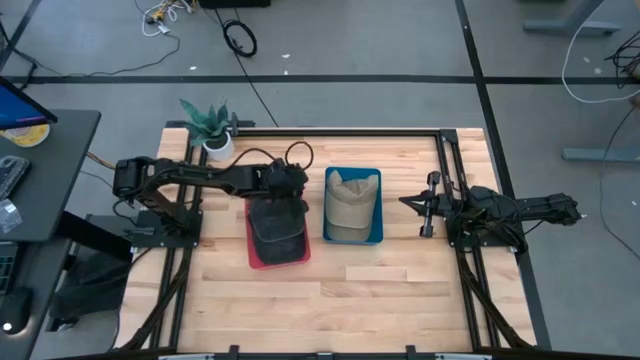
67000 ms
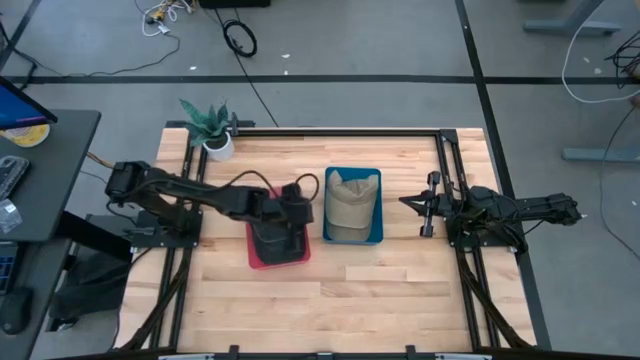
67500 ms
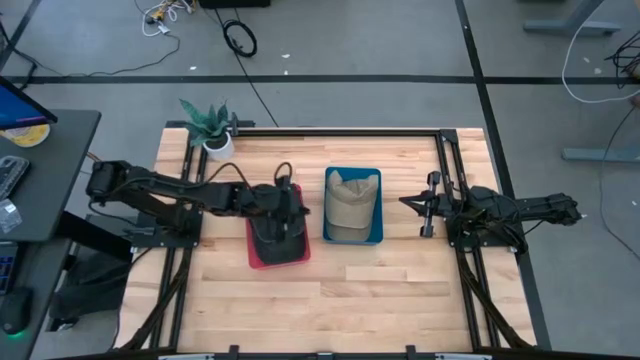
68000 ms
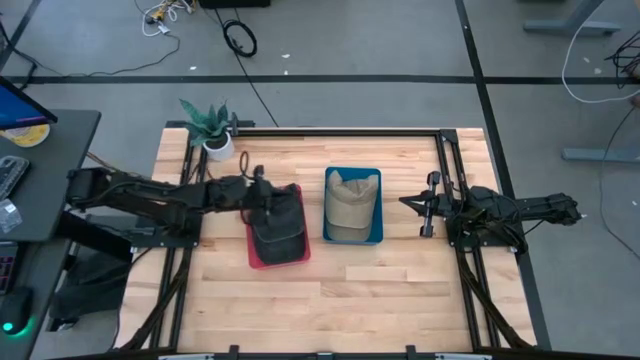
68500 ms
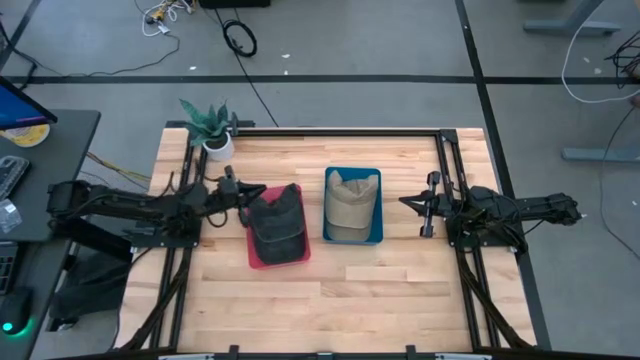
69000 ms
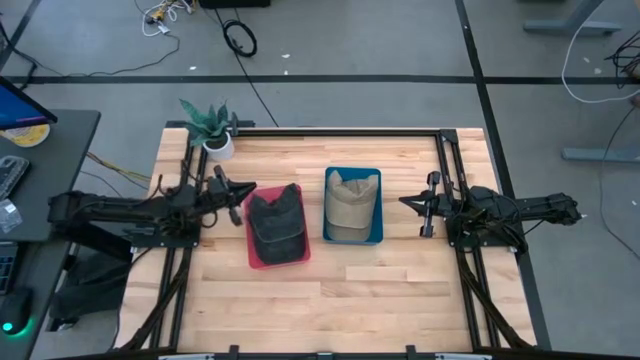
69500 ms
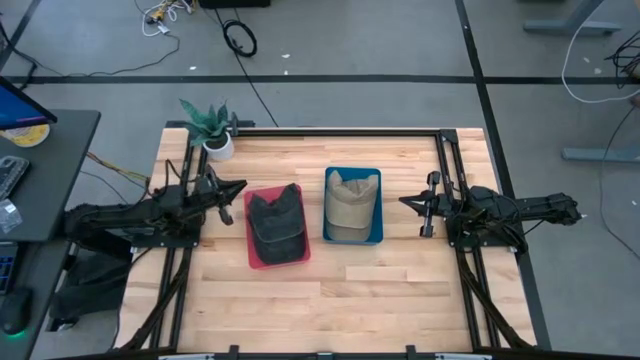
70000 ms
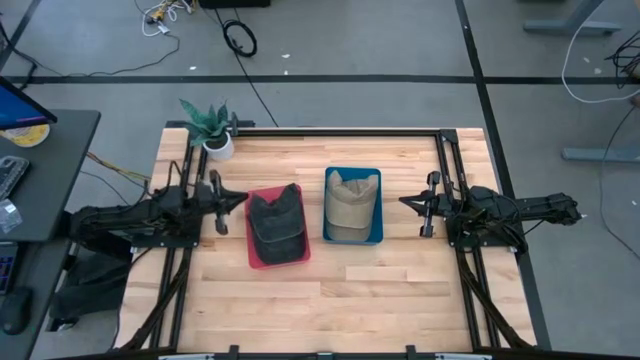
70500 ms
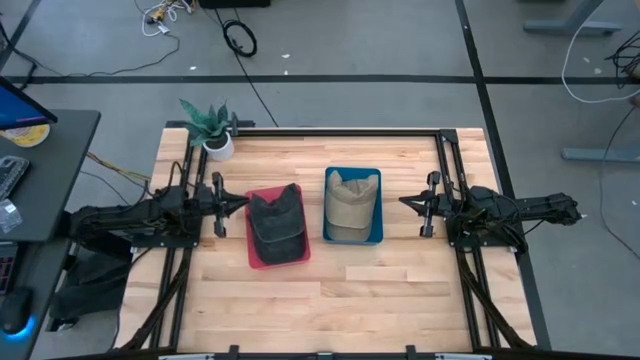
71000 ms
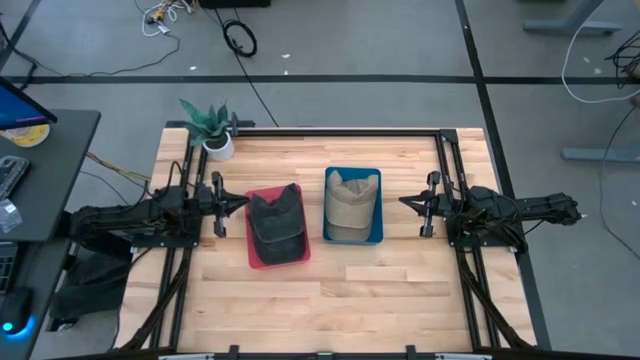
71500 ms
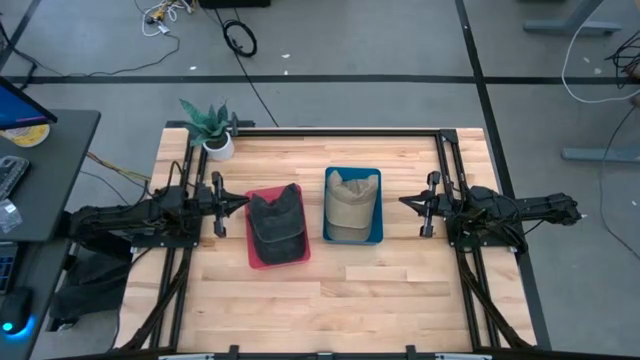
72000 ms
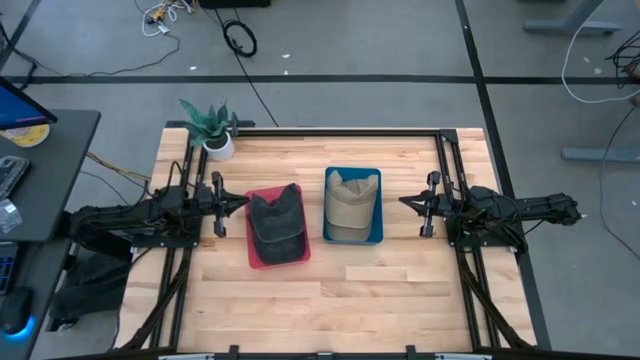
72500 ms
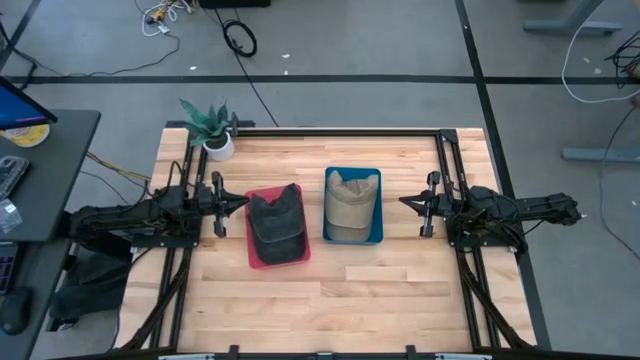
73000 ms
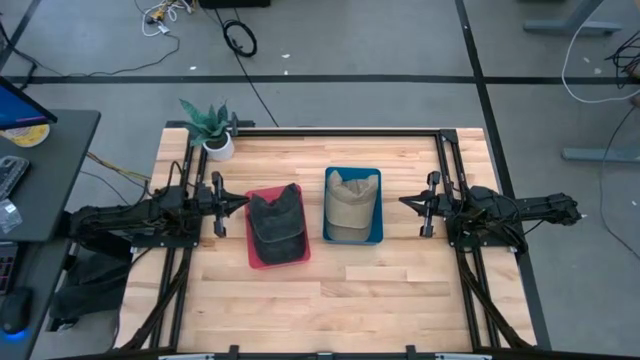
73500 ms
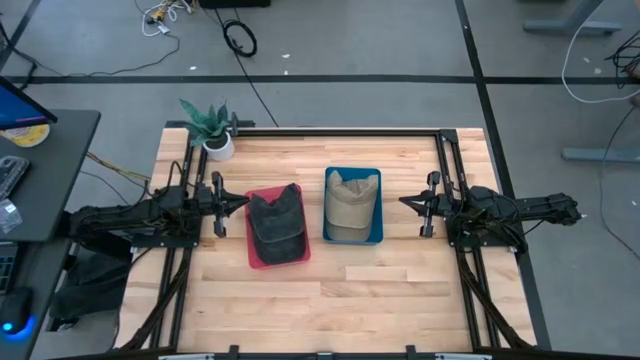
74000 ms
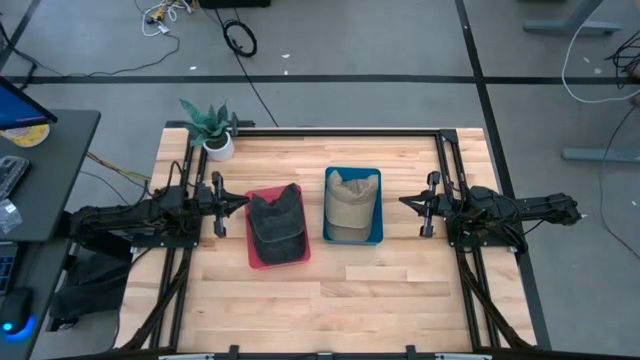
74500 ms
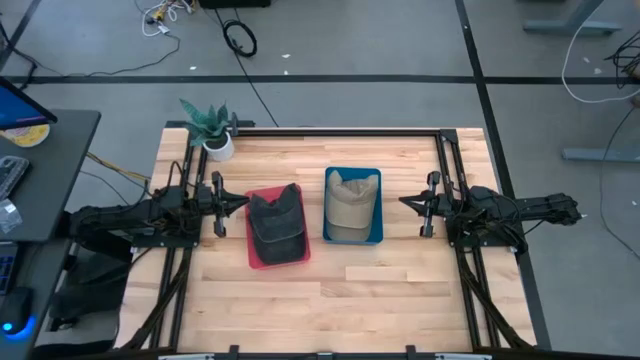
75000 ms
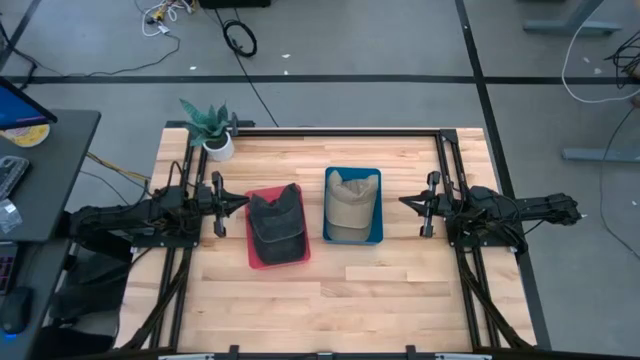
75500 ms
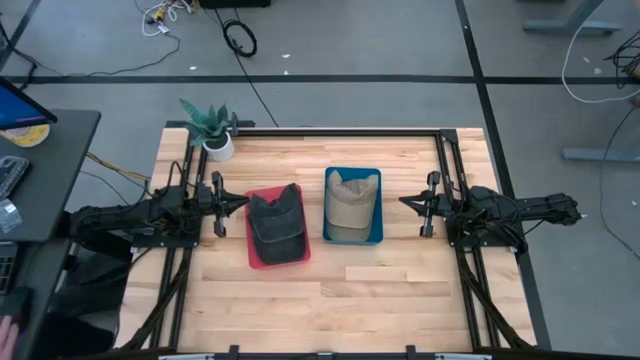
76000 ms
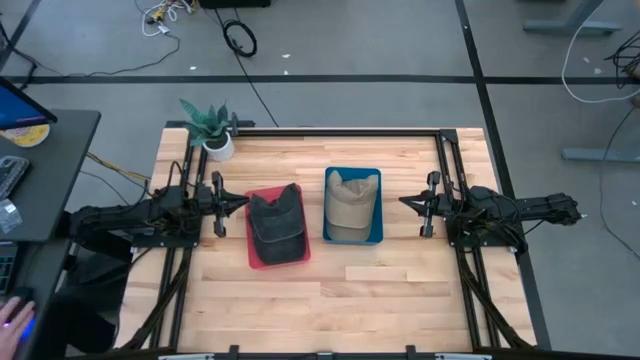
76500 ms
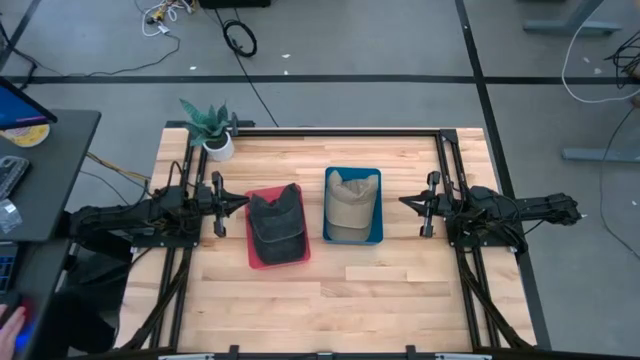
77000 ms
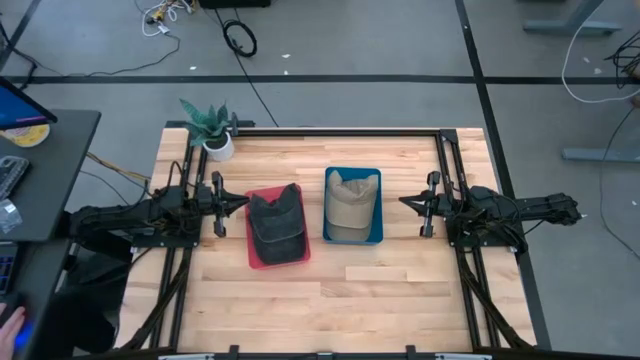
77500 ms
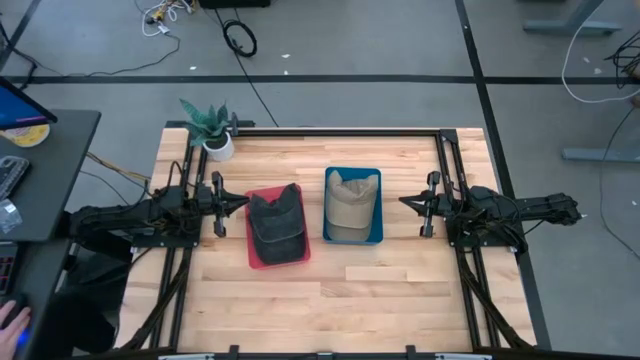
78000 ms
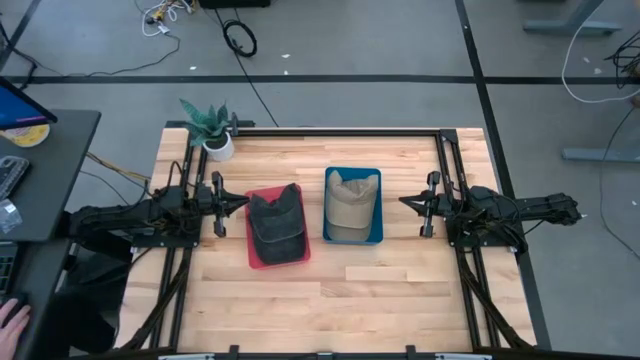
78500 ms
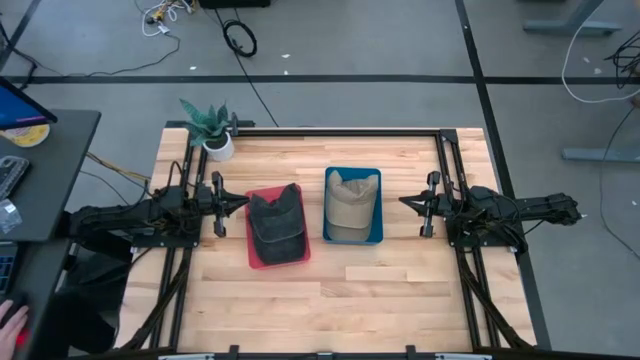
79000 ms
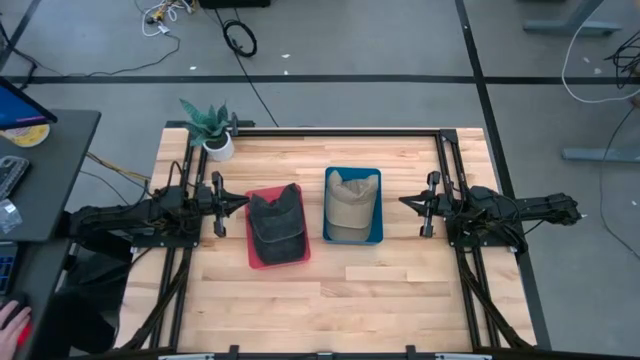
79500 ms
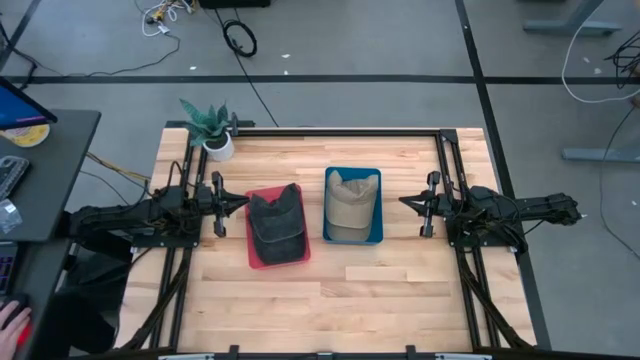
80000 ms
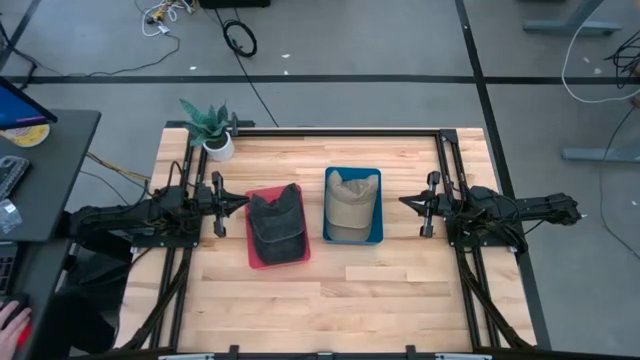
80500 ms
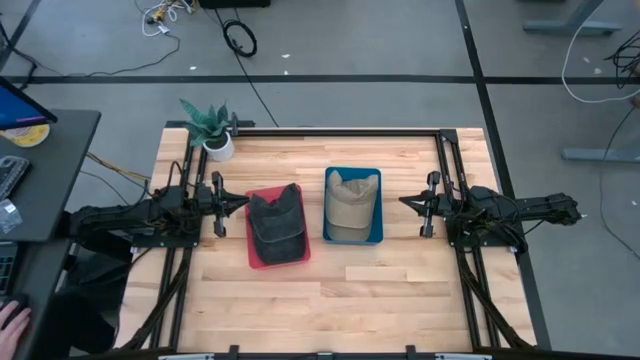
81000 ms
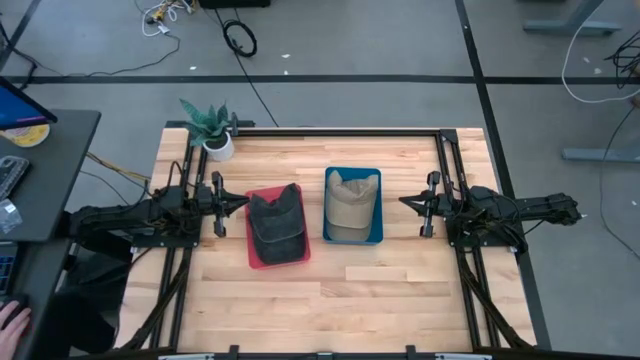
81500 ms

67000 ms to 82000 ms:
Task: Pick & Place hat
Return to Home Position

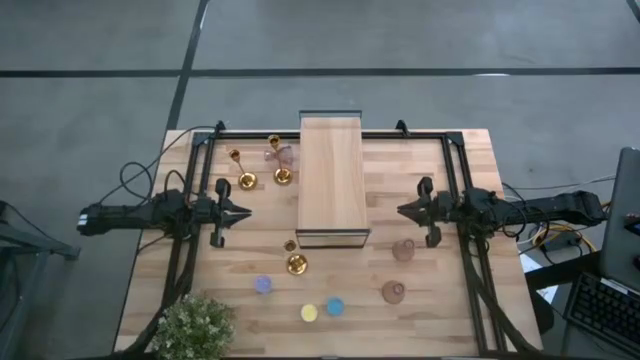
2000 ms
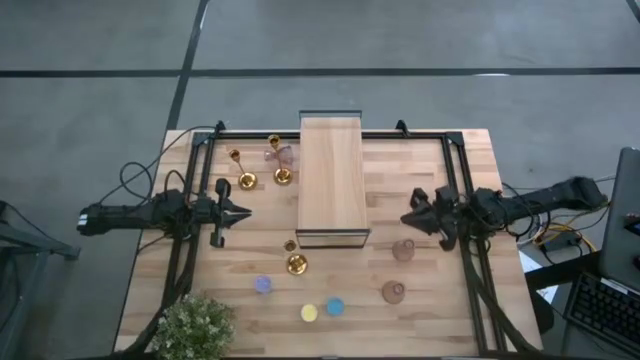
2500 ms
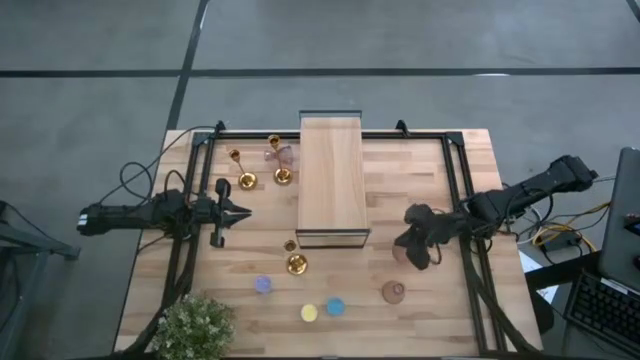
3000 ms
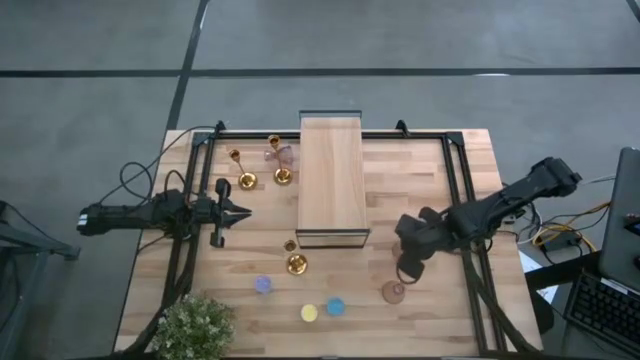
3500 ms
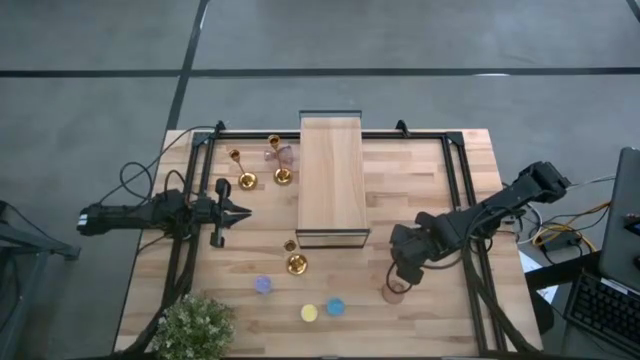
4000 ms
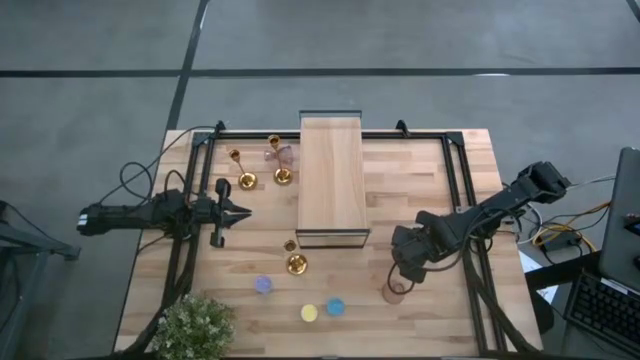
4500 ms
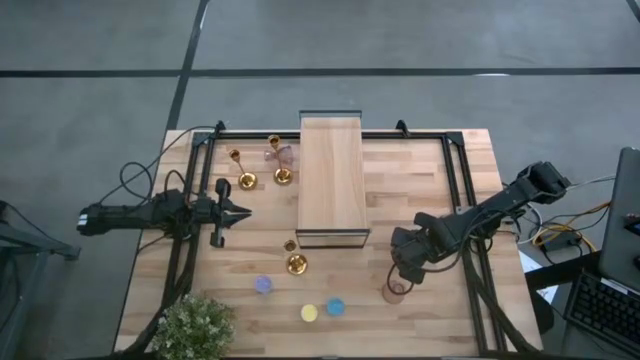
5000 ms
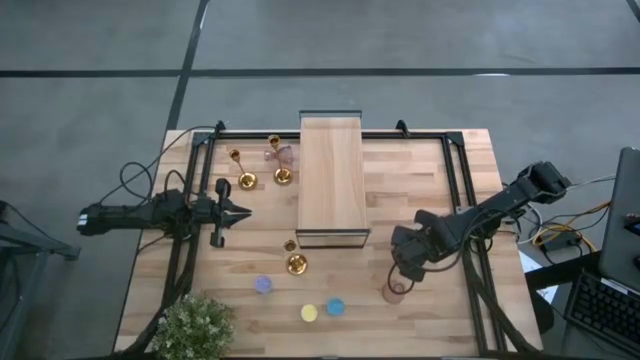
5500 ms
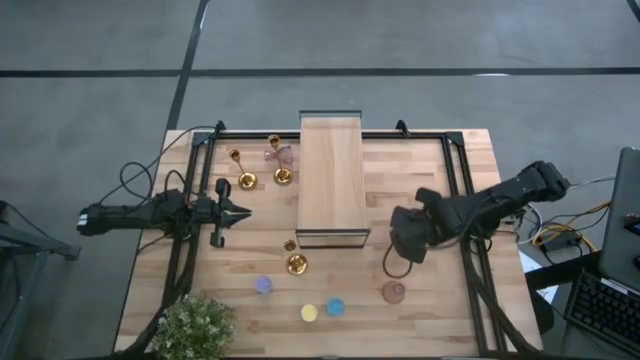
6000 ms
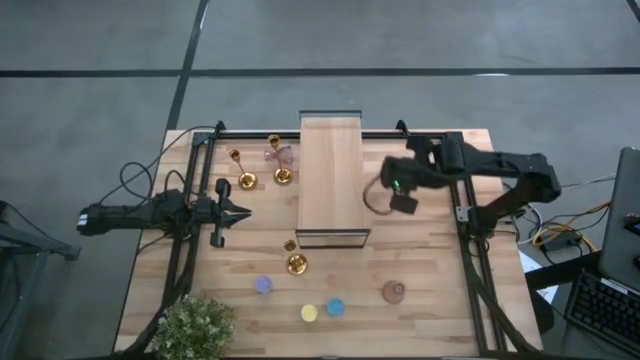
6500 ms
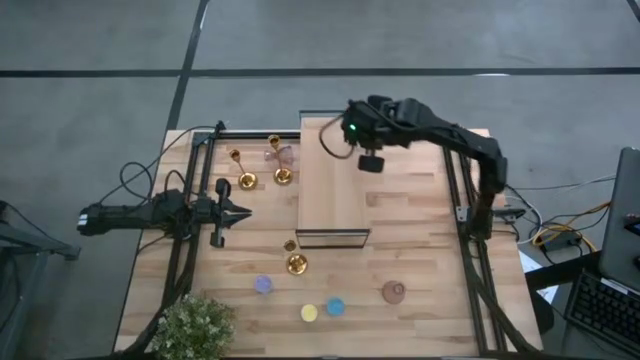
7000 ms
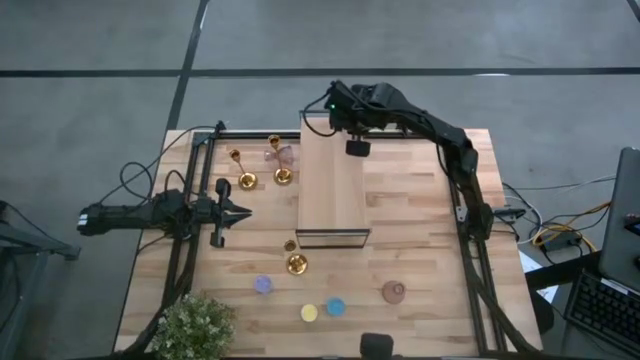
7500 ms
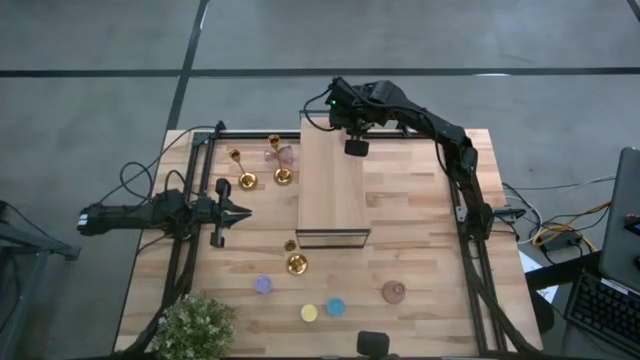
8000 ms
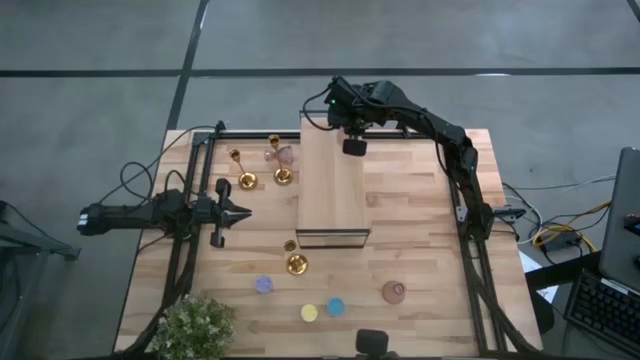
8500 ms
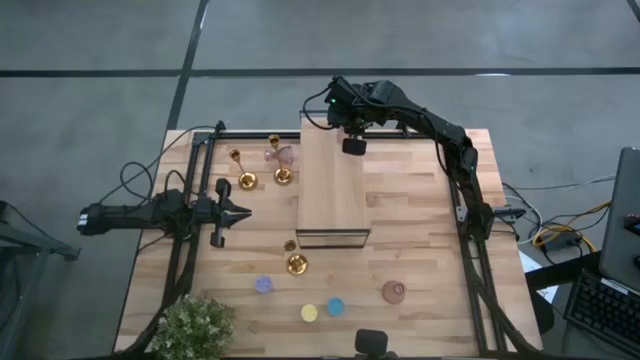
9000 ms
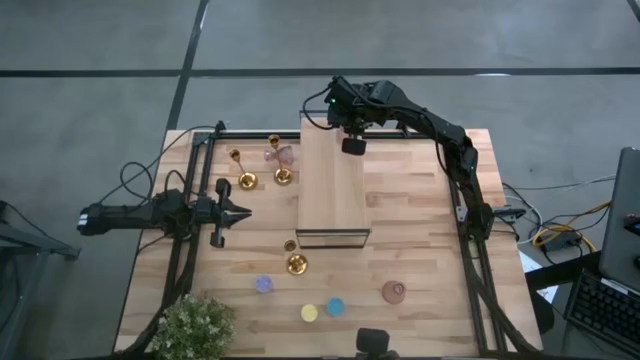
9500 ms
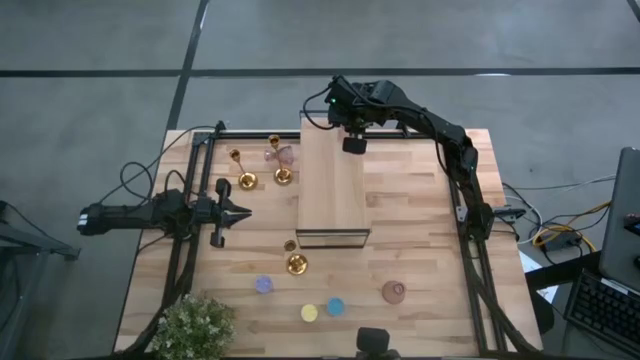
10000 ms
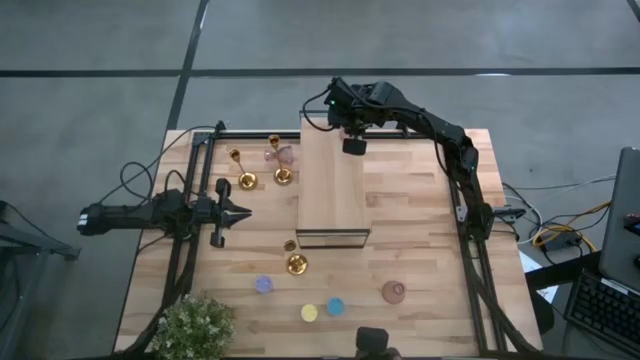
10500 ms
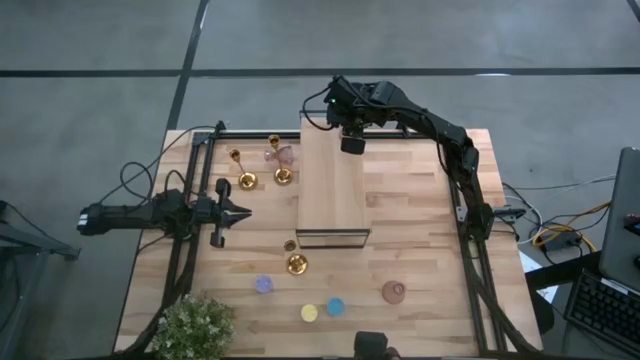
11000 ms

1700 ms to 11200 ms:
Task: Pick & Place candle stick holders
Put the middle purple glass candle holder on the shelf
